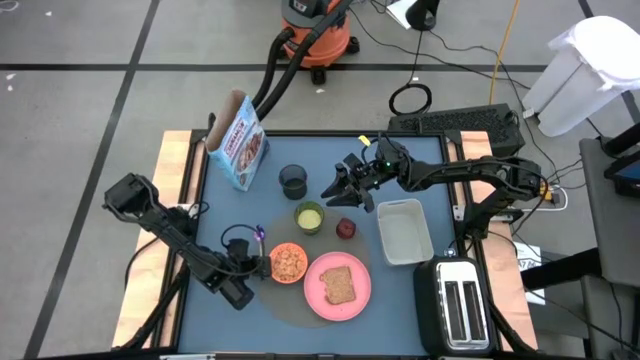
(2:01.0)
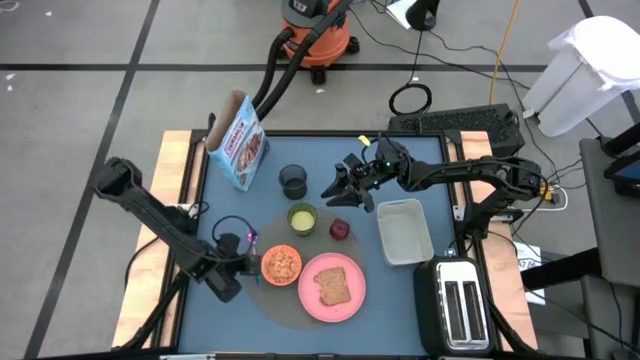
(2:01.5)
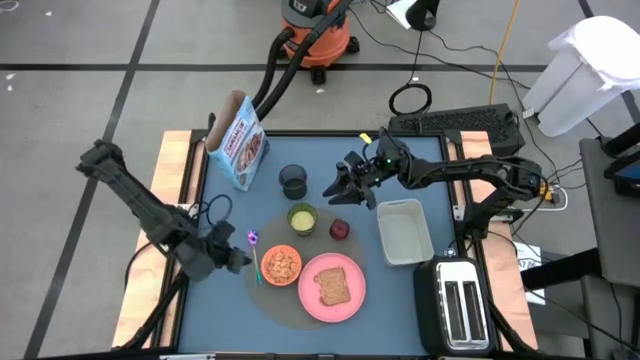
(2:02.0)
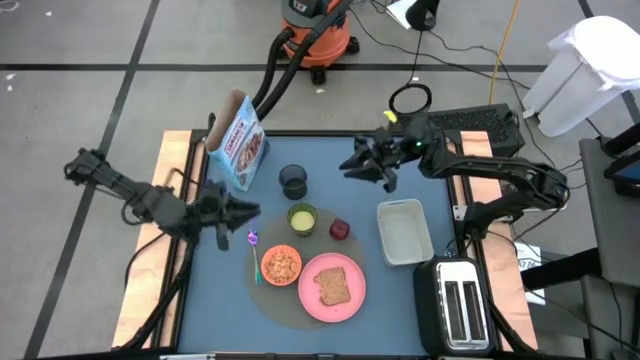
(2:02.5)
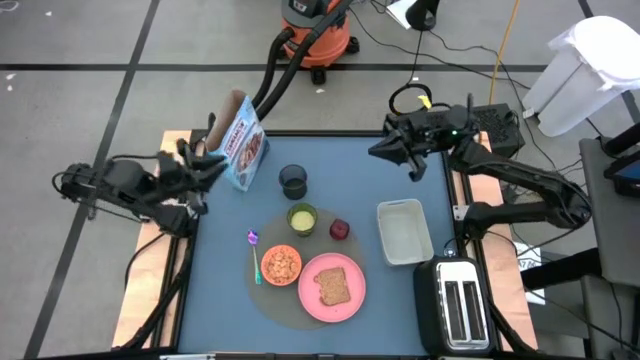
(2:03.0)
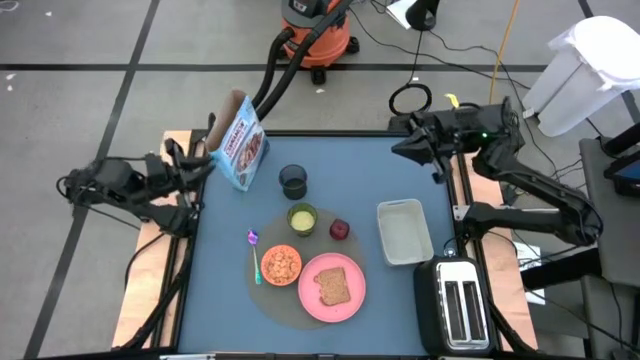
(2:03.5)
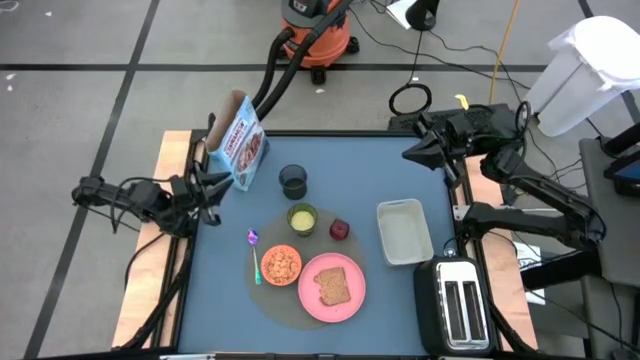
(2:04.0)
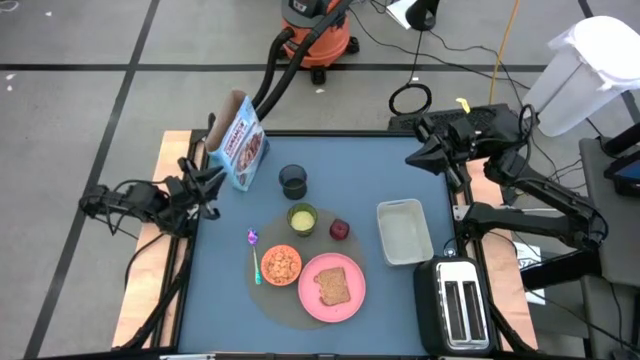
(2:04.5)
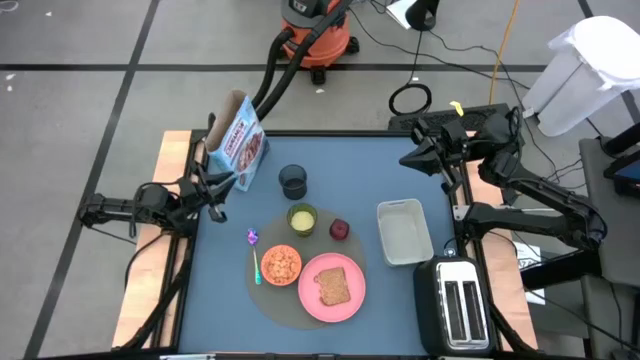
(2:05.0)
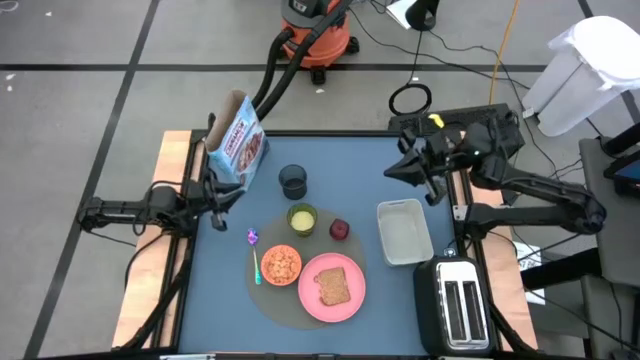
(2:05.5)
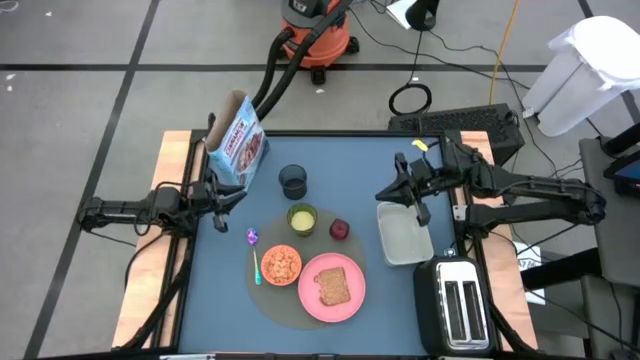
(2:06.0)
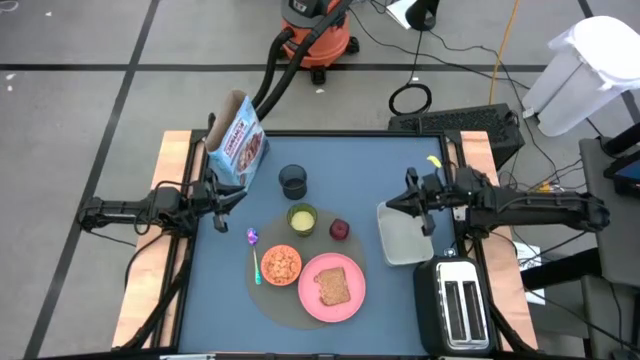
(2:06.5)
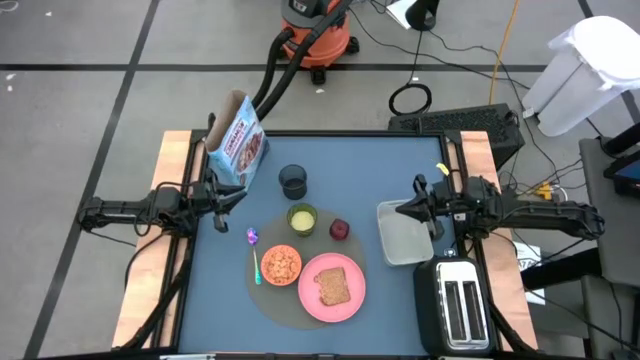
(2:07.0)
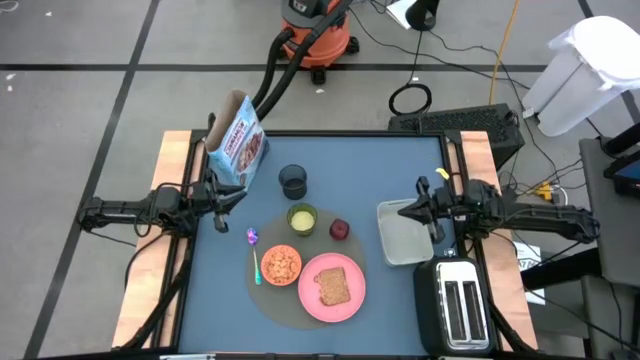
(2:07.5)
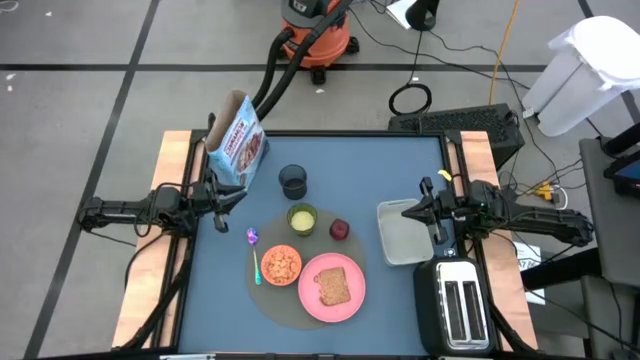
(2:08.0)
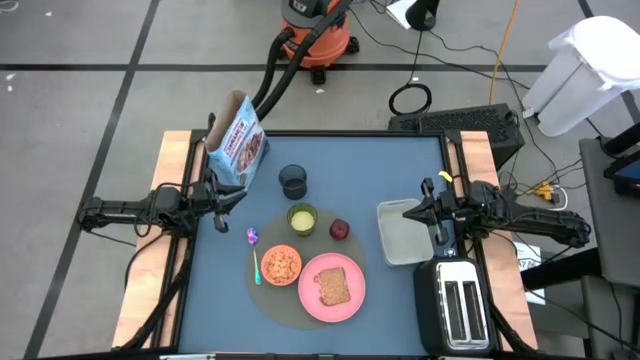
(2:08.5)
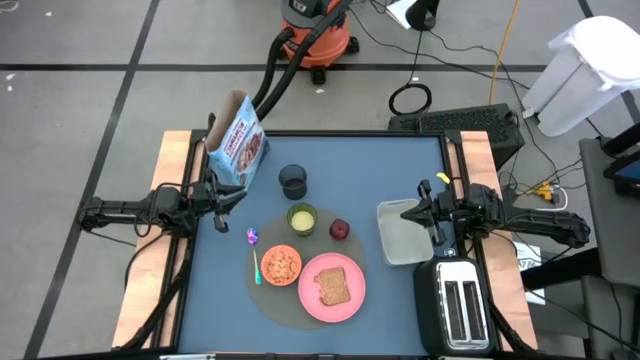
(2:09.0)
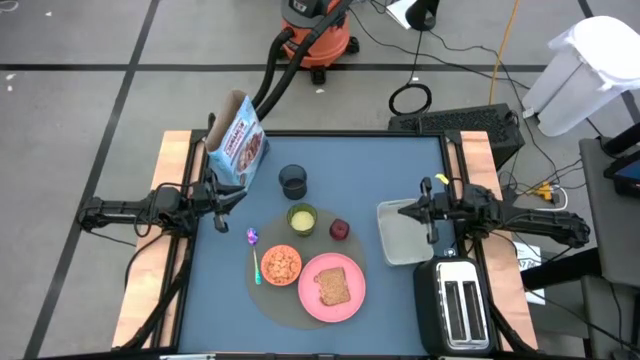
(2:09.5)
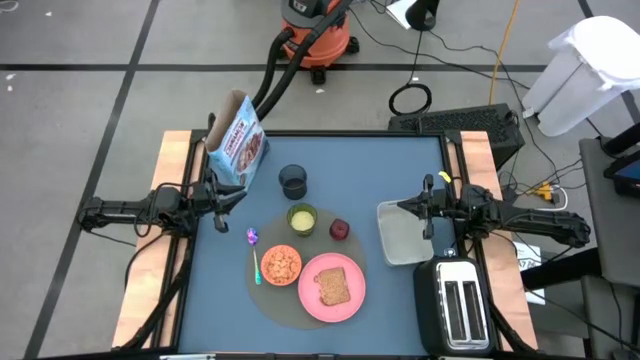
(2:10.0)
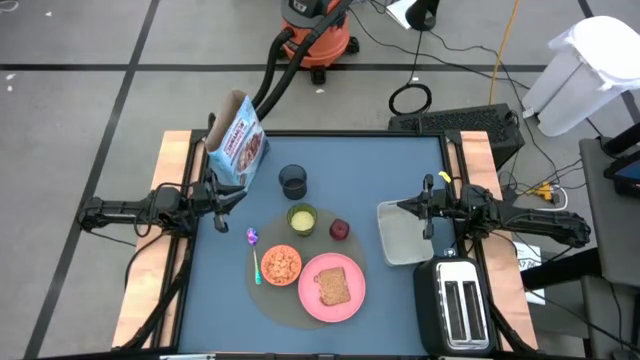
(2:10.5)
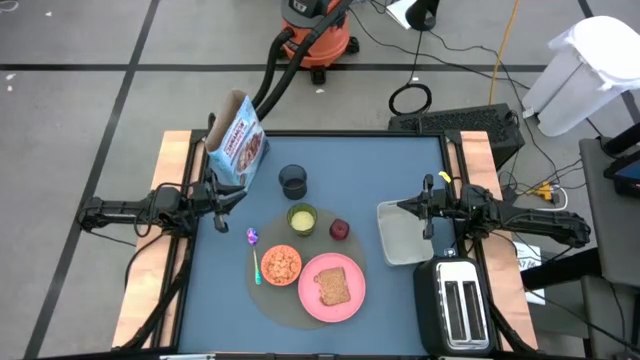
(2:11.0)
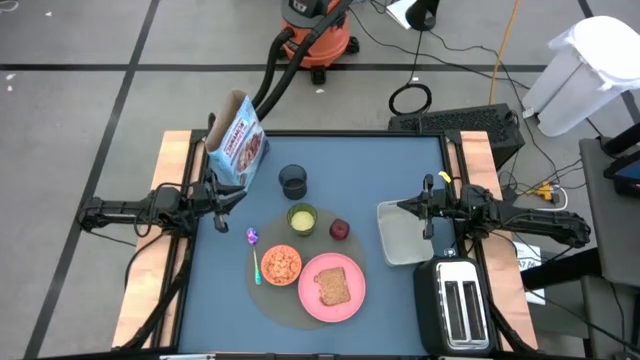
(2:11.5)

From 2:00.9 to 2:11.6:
Task: Arrange a breakfast setting
Return to Home Position

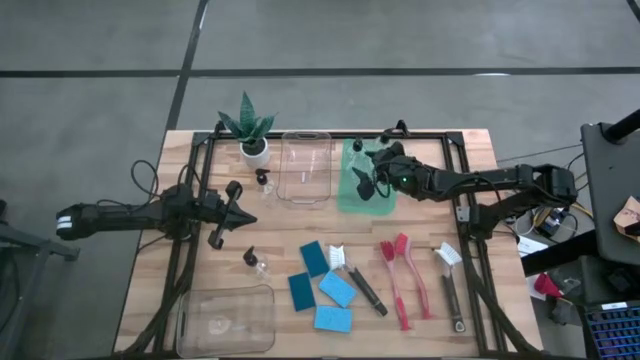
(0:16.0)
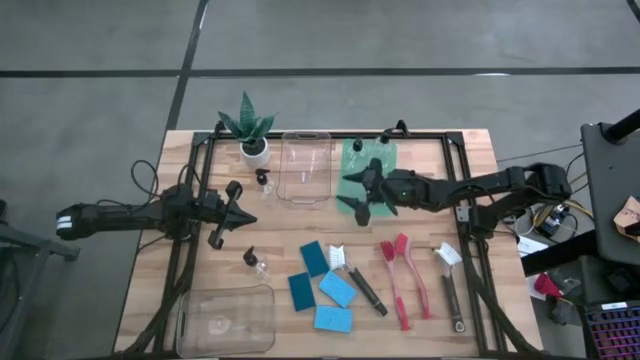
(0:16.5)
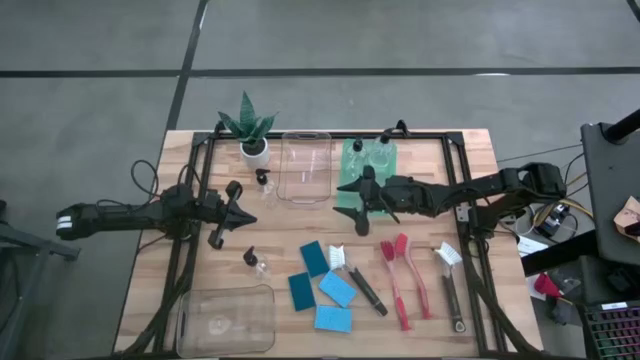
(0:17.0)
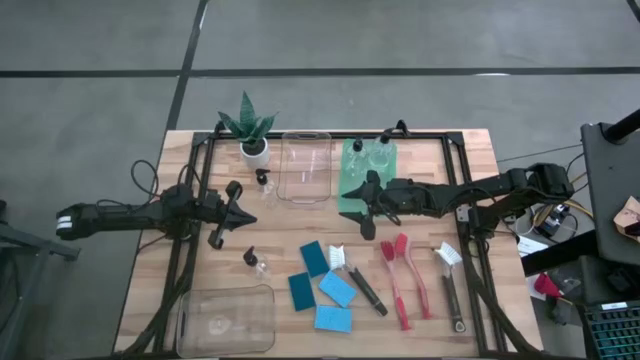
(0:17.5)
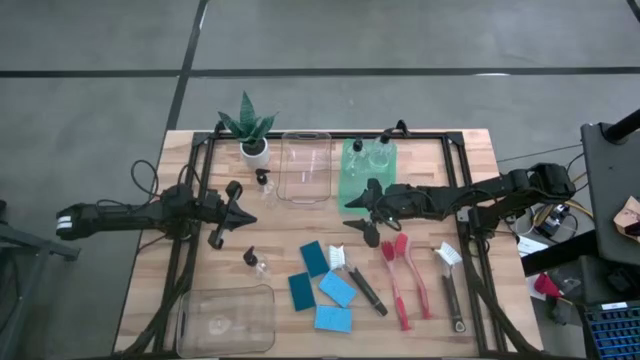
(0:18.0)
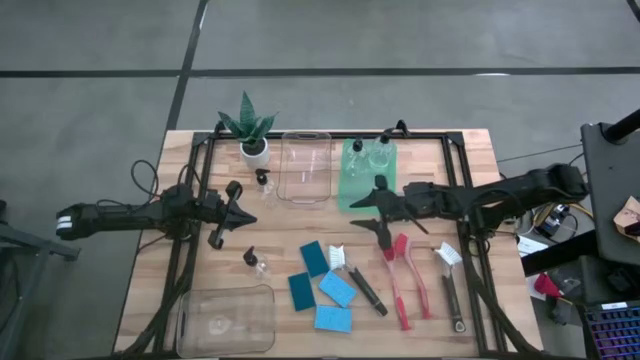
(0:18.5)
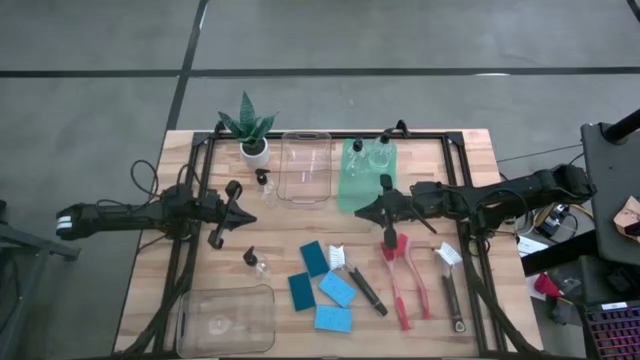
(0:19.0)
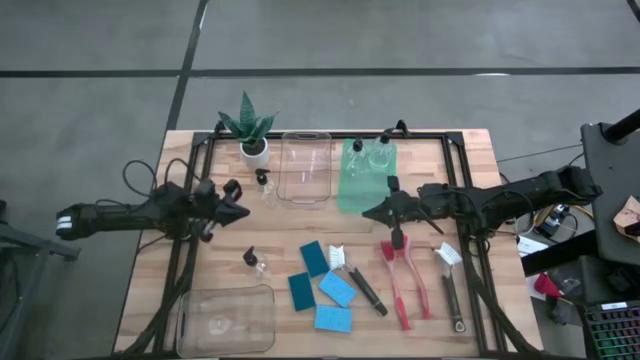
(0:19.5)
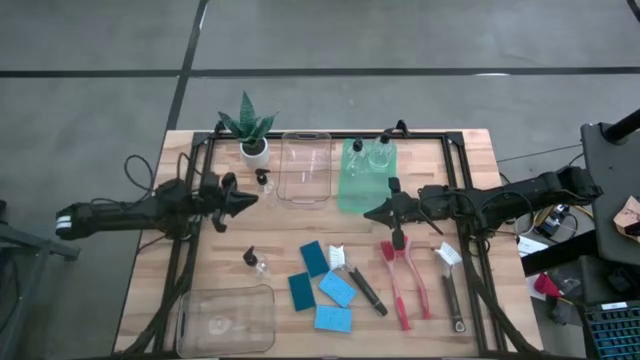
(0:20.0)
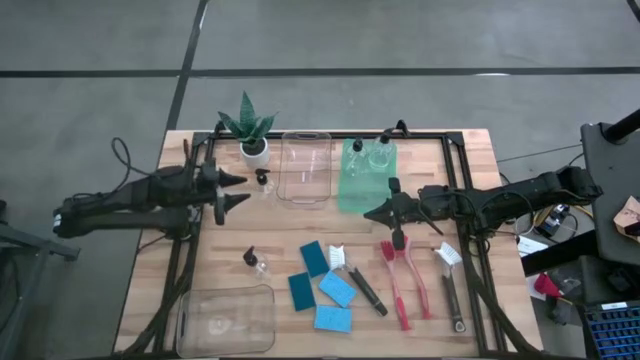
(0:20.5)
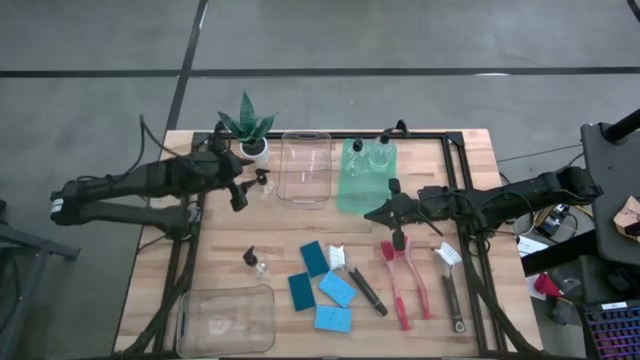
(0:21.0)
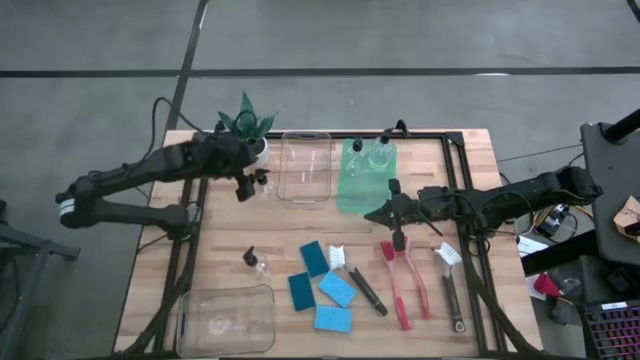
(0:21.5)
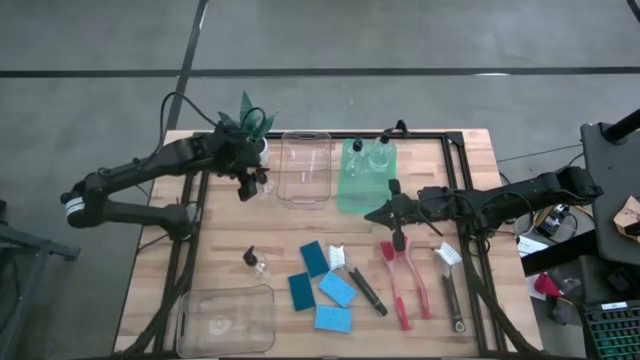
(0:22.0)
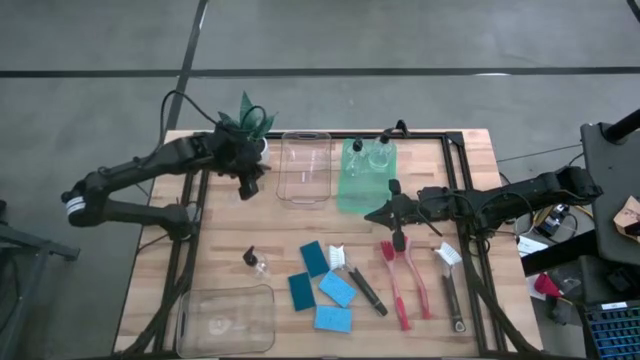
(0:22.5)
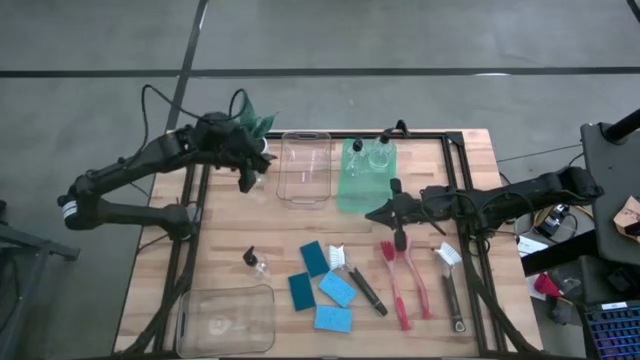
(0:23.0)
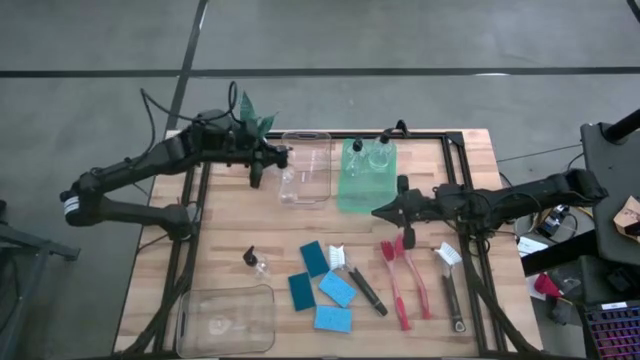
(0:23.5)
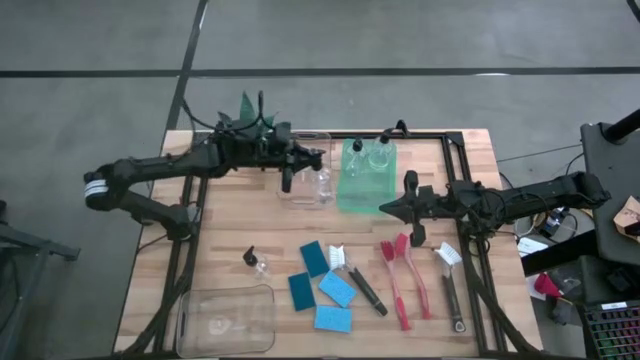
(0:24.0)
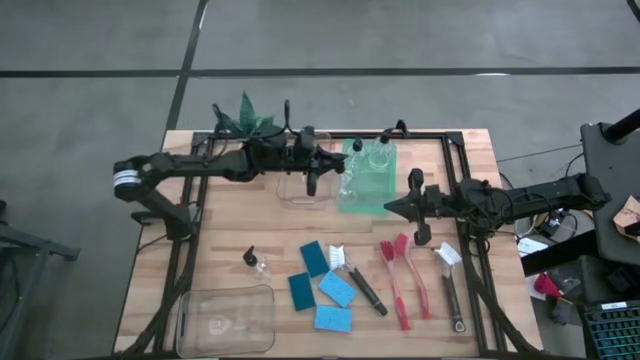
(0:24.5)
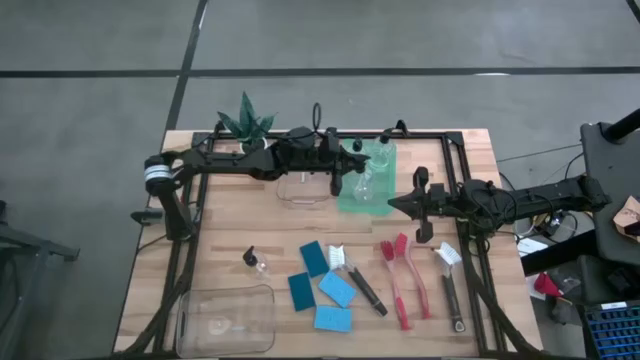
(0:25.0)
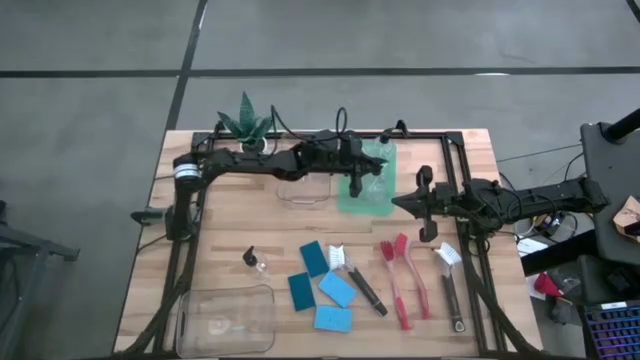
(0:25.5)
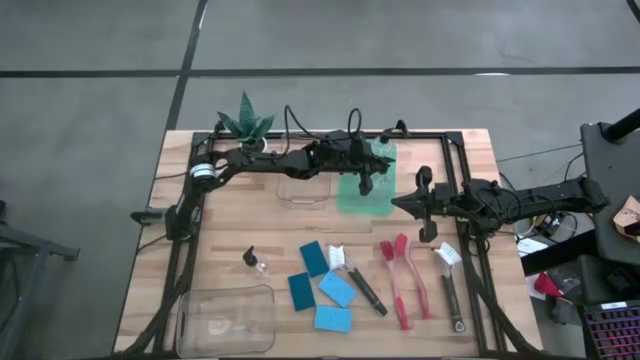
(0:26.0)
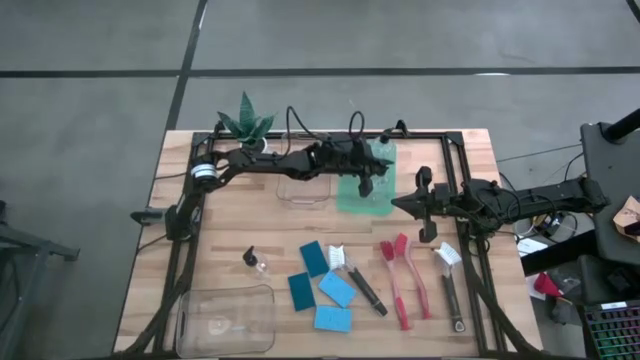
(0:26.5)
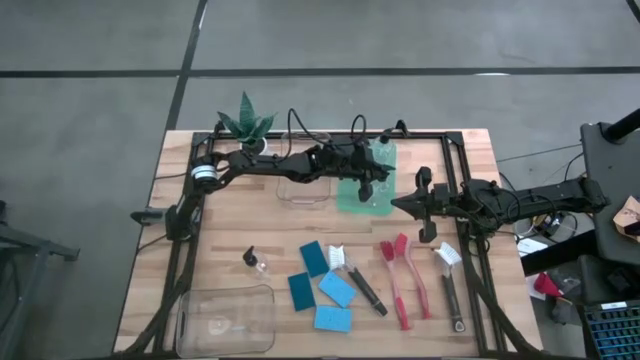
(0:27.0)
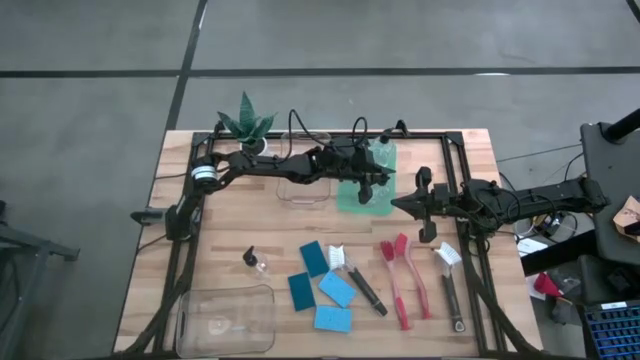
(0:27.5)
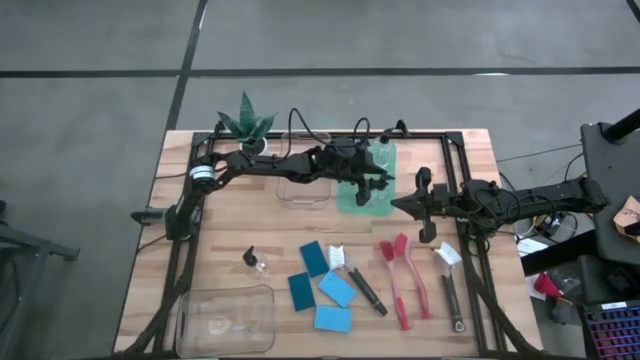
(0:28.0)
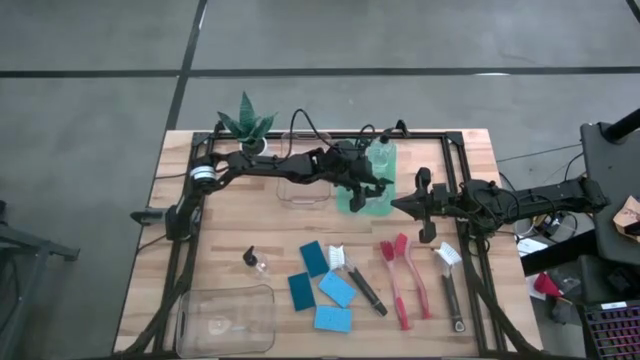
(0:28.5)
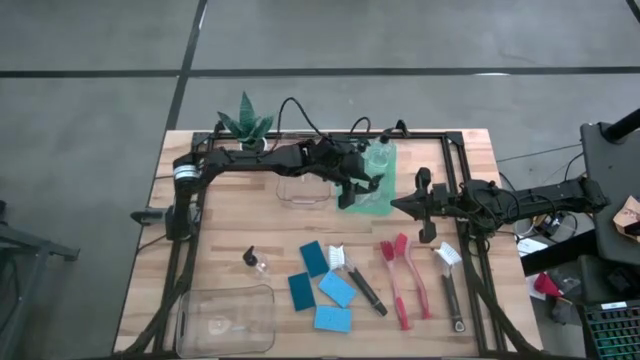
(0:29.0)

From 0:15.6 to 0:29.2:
Task: Pick & Place Kitchen Sink Supplies
Put the transparent soap dispenser into the green bin
